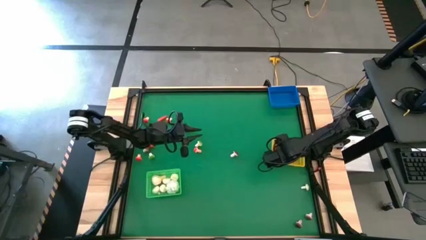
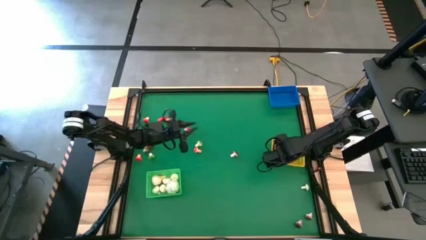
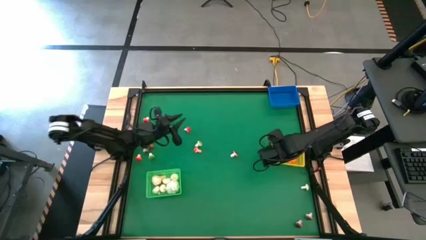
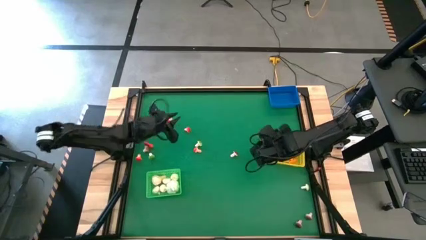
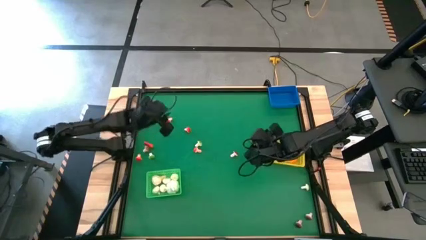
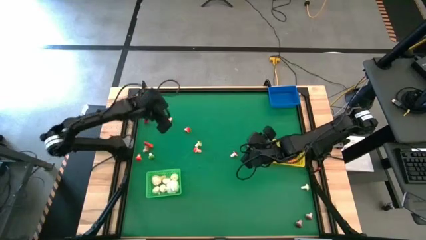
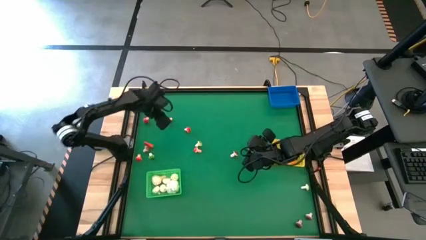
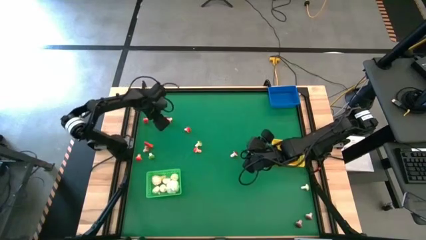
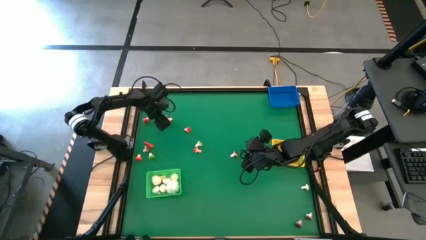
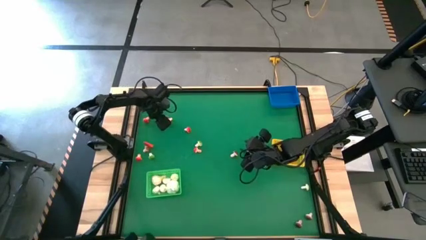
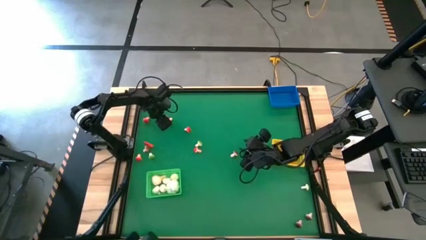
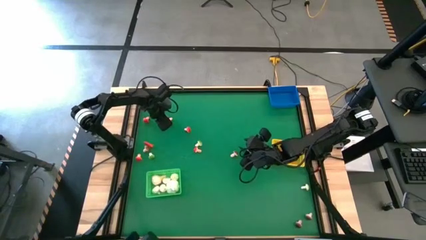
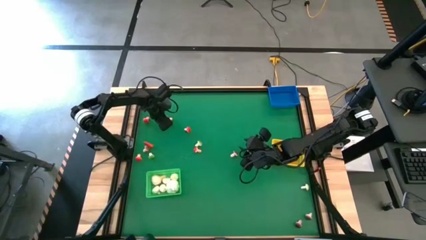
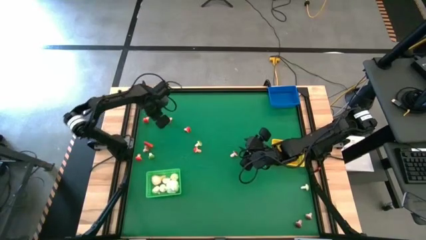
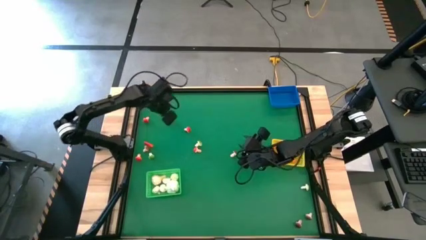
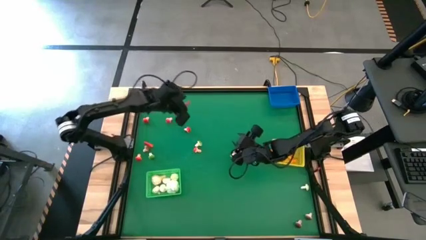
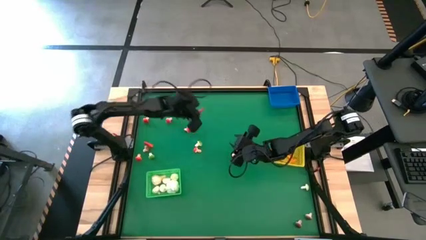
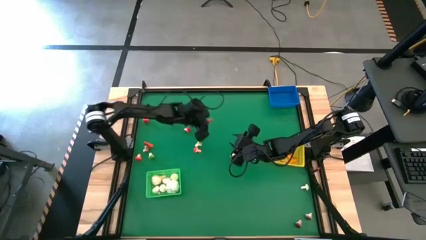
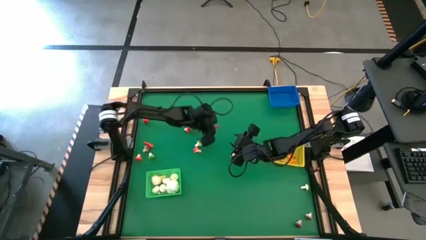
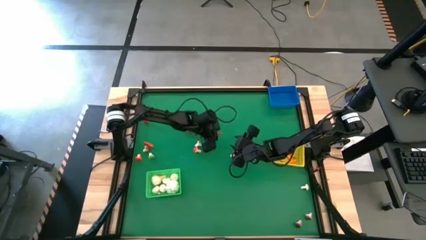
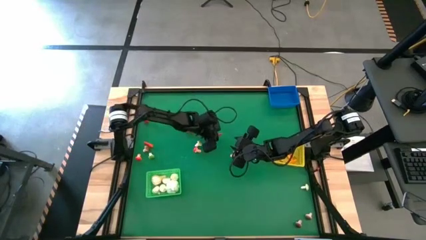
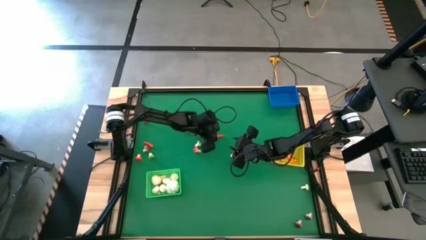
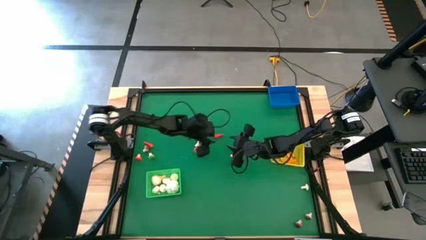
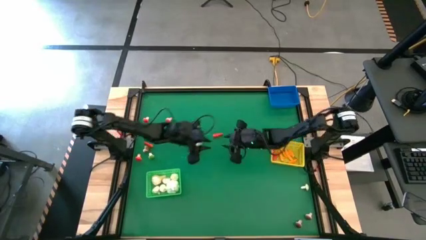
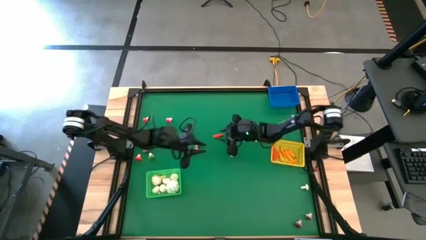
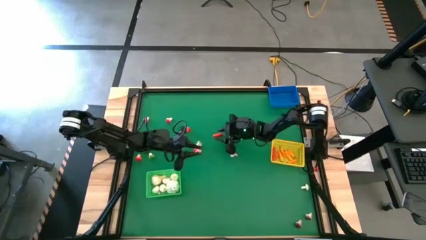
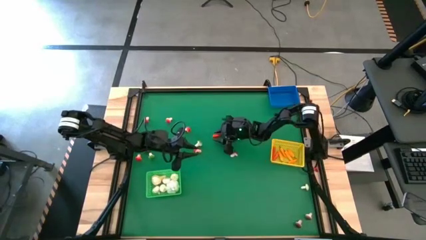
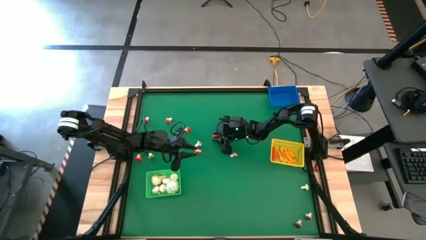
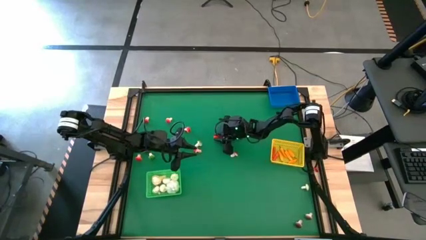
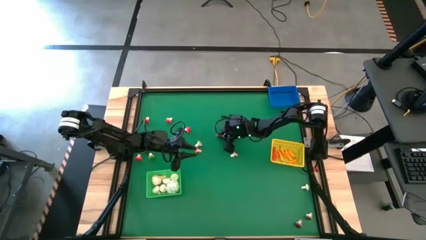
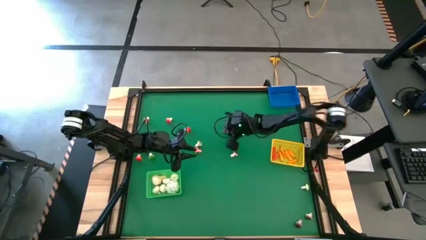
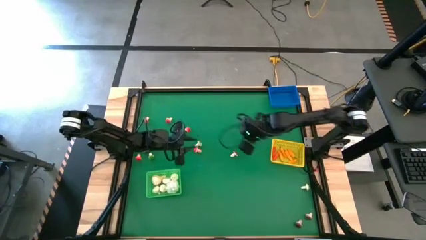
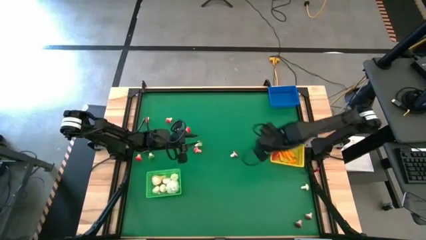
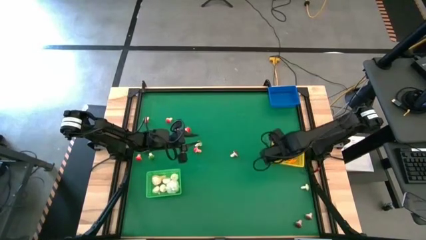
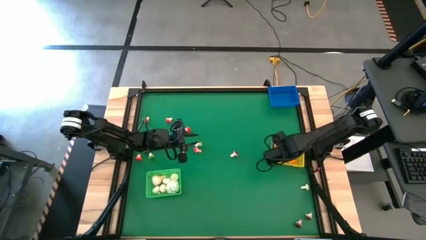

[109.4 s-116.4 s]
Task: Sort produce into baskets
Put the red chili into the yellow bin

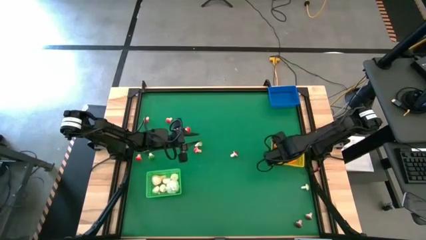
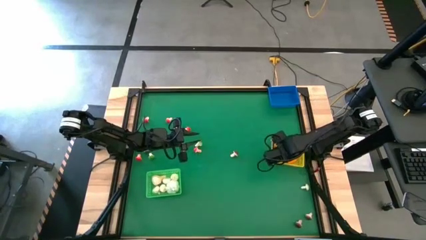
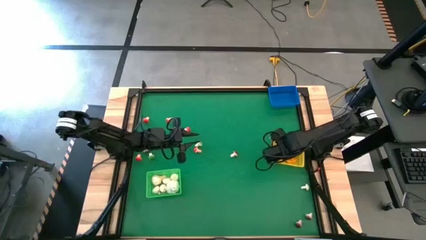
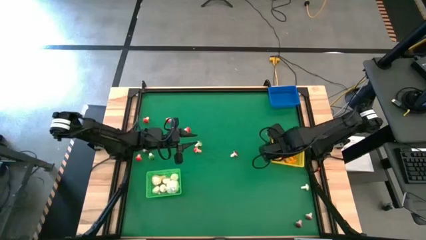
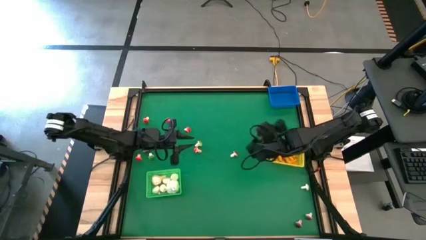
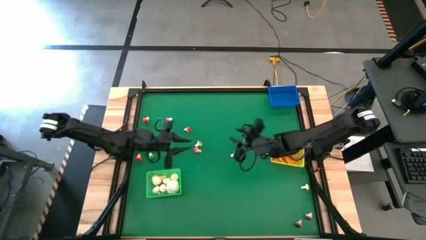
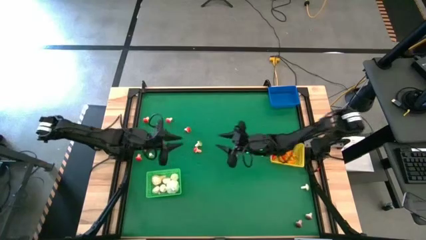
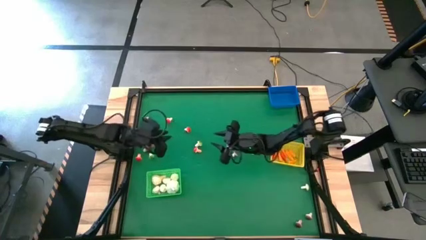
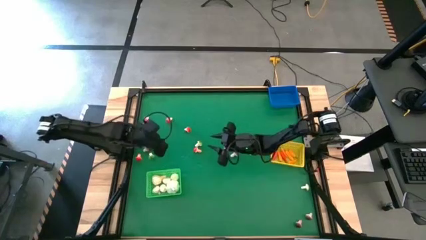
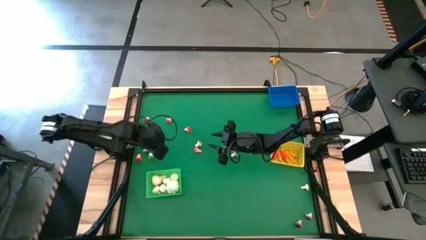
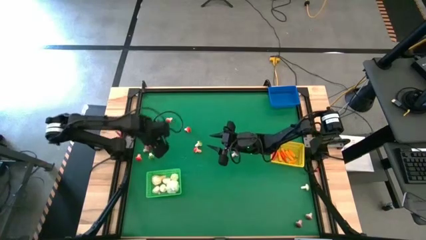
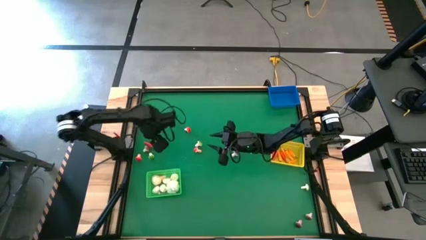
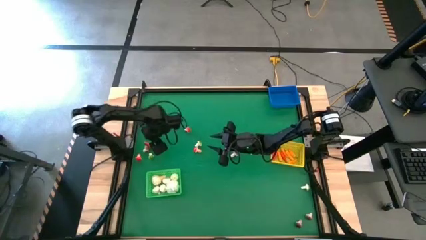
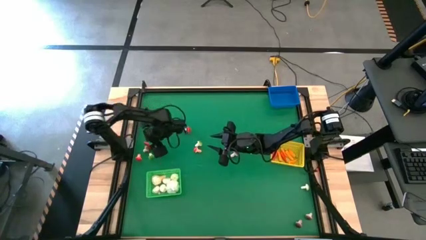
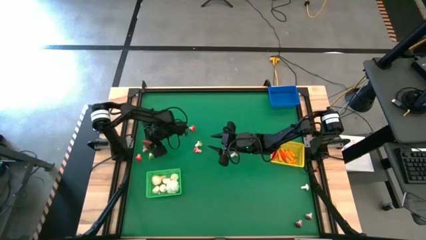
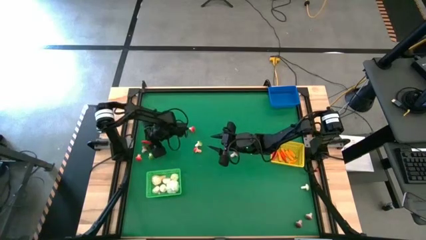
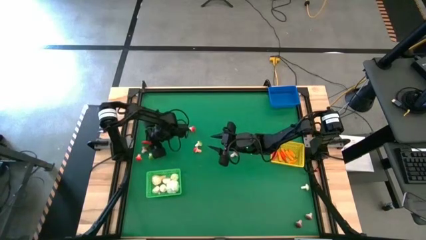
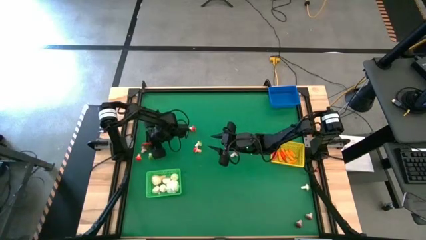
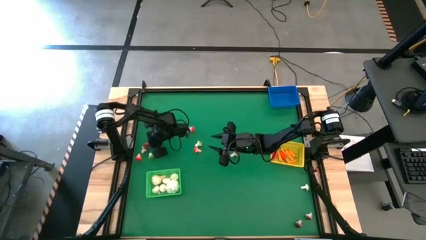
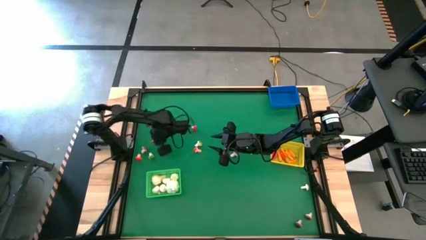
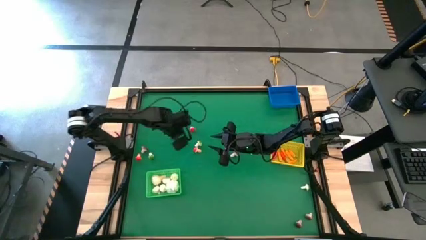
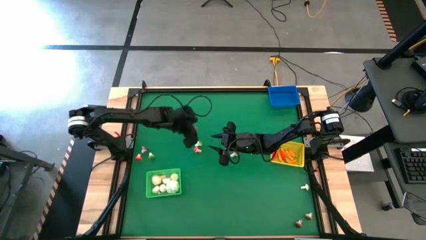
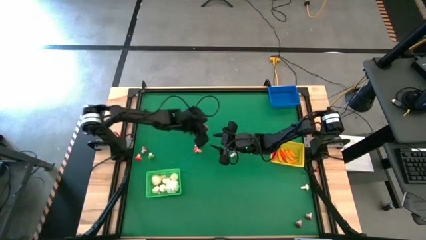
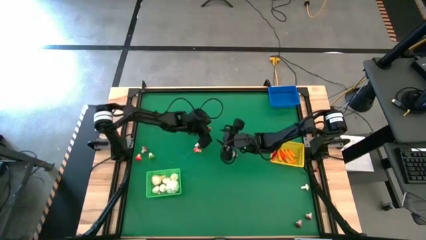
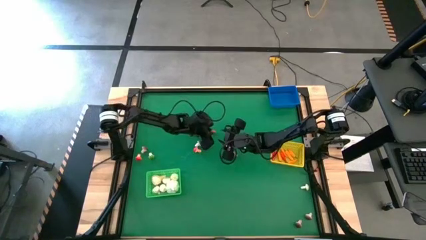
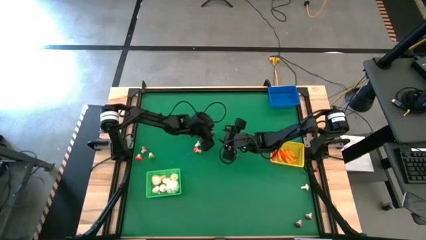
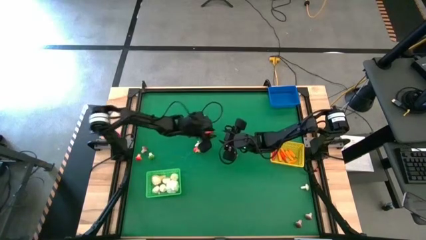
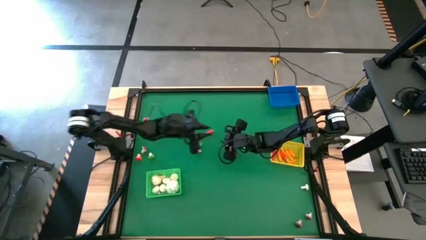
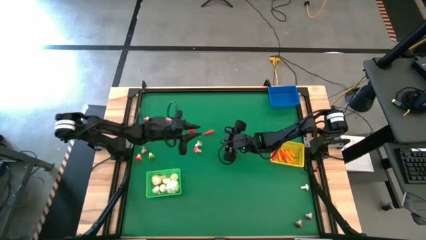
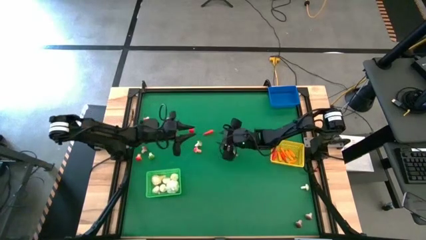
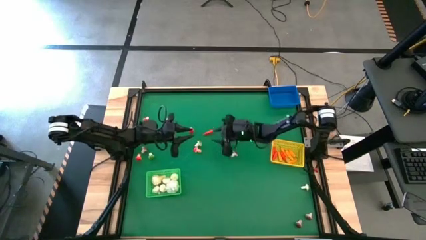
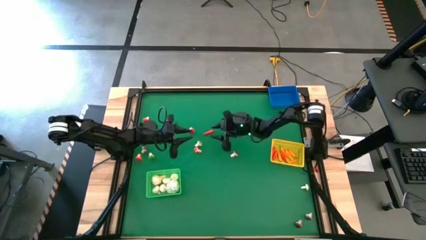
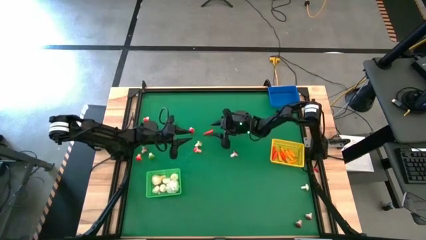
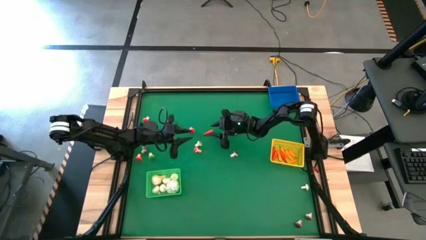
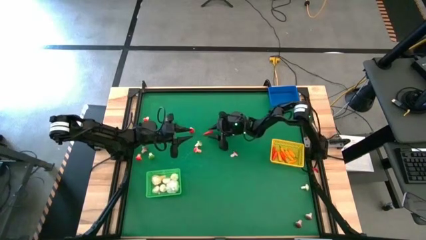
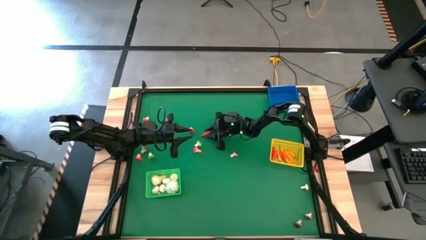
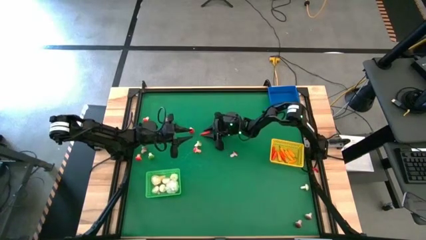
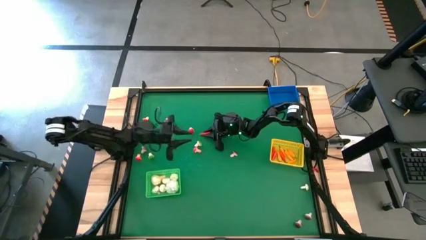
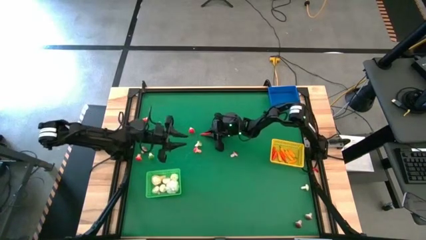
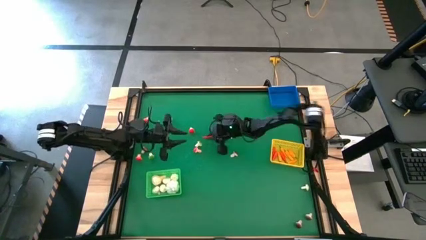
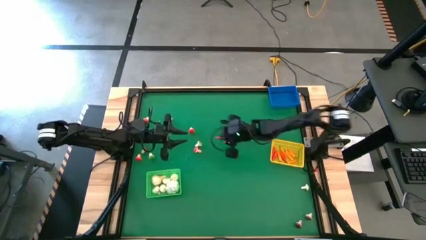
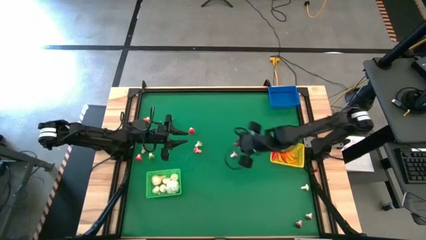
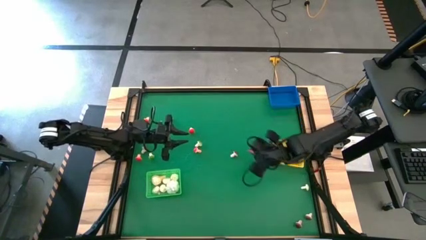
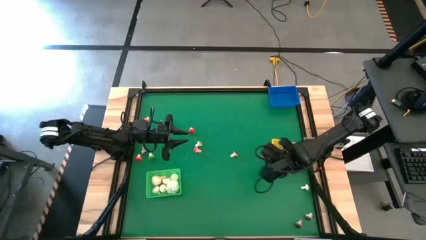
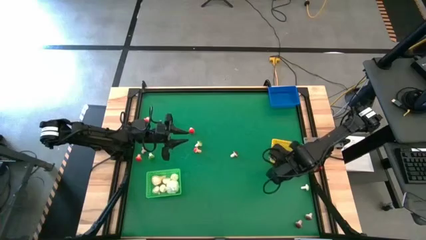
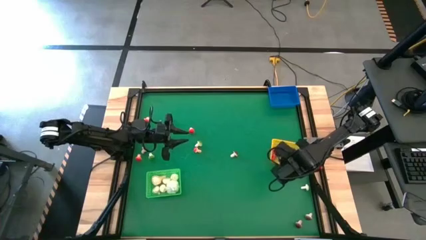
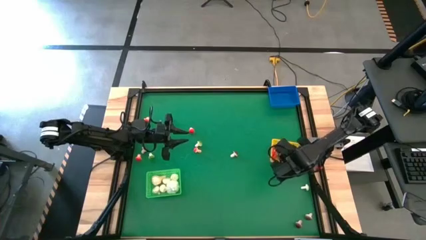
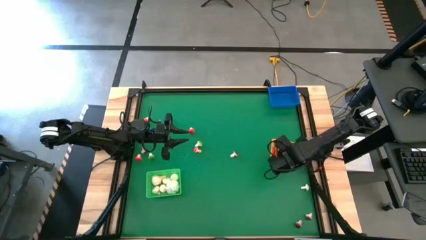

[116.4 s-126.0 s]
Put the red chili into the yellow bin
